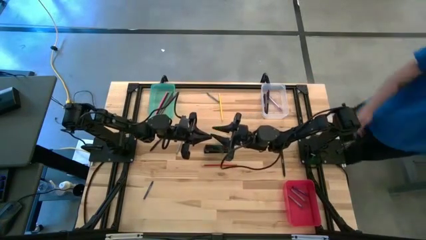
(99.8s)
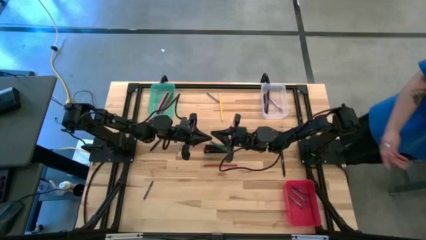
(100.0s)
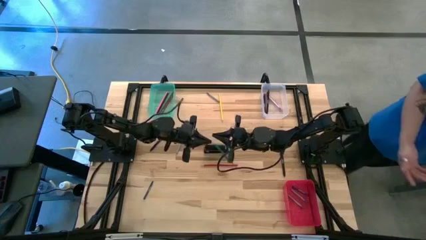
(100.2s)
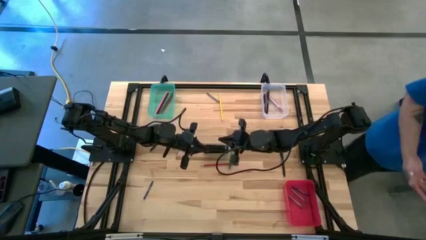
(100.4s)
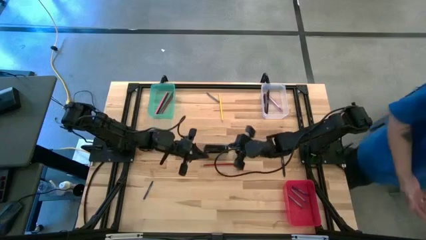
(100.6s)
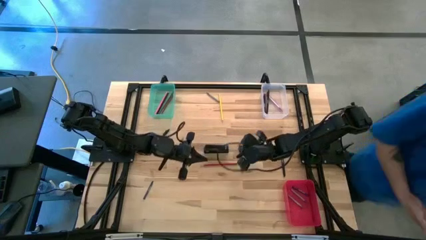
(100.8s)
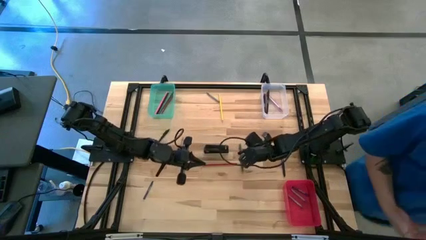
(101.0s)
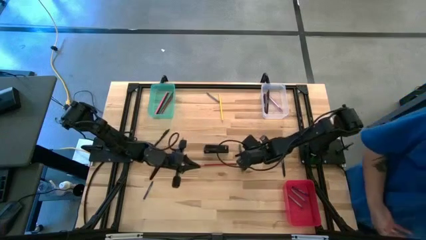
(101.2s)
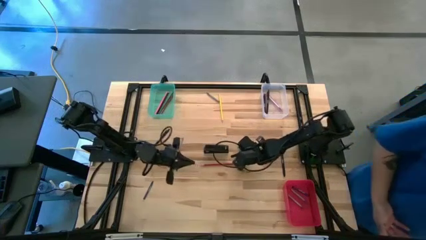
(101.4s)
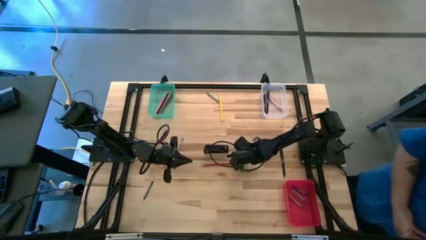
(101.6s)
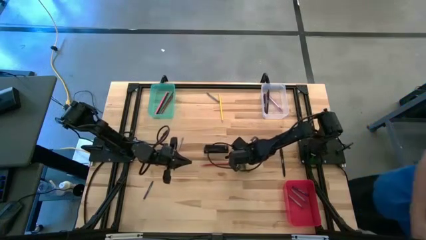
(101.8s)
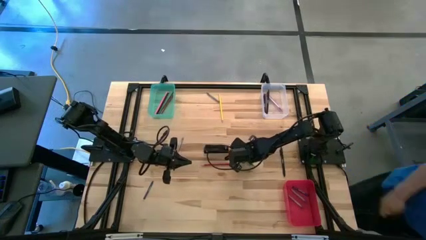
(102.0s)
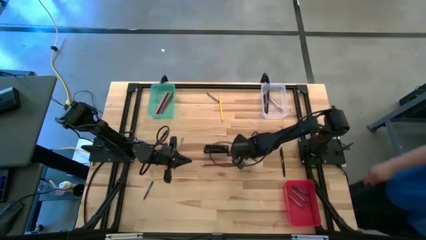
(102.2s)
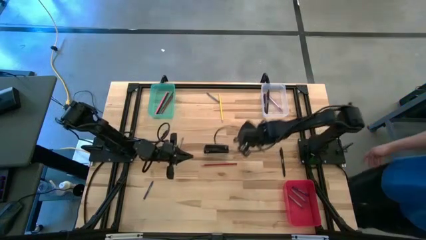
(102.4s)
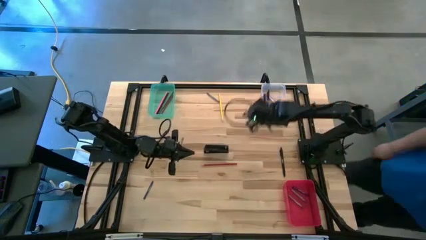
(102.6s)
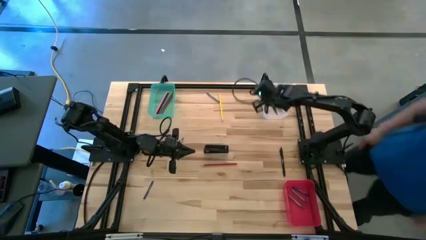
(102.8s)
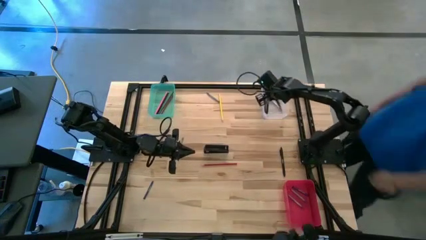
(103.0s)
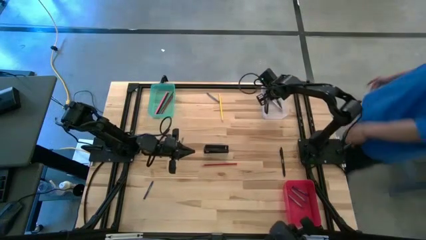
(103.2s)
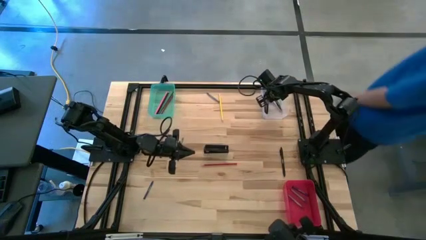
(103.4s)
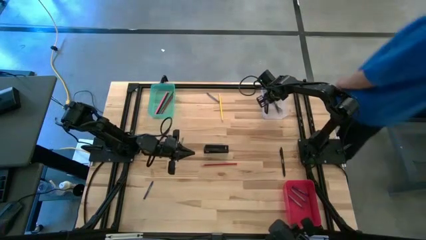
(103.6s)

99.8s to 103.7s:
Task: Sort crayons/erasers/pens/pencils in bins
Put the green pen into the transparent bin

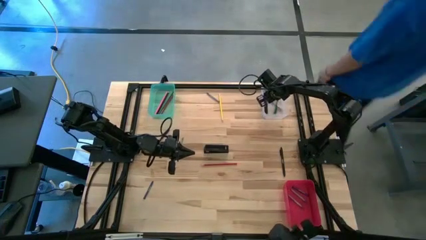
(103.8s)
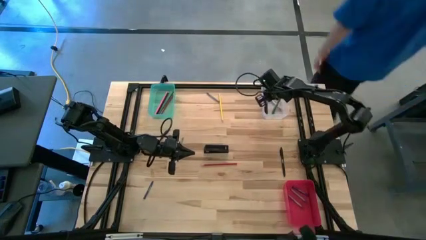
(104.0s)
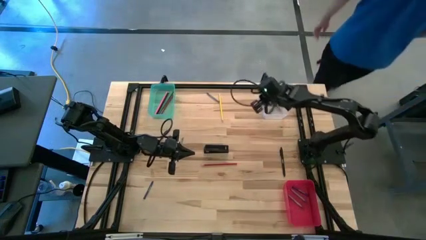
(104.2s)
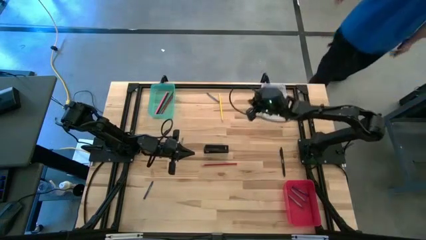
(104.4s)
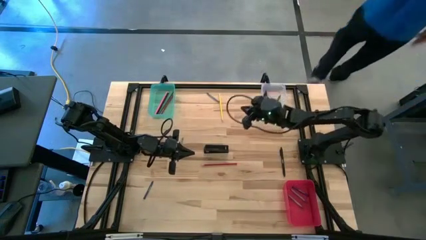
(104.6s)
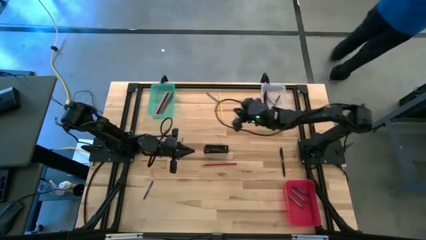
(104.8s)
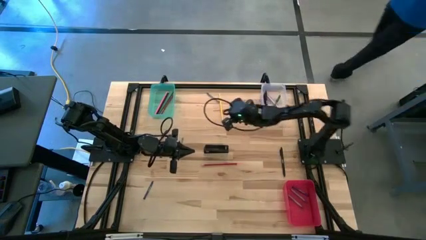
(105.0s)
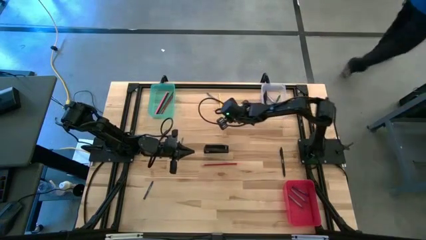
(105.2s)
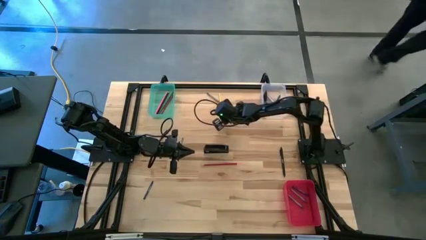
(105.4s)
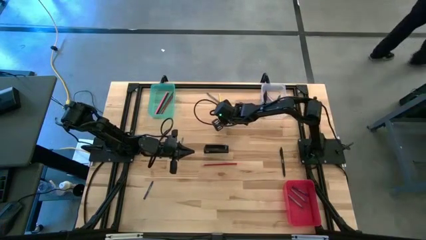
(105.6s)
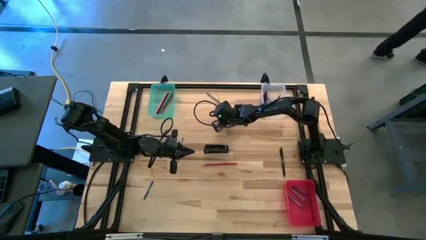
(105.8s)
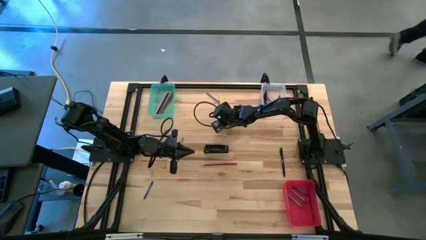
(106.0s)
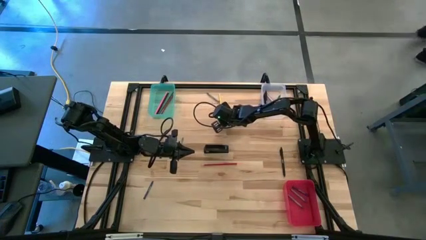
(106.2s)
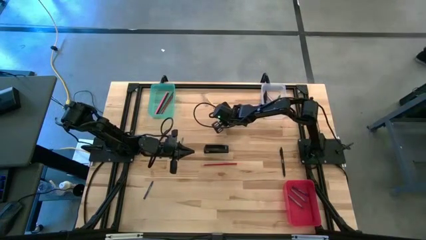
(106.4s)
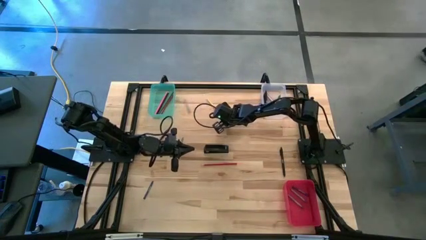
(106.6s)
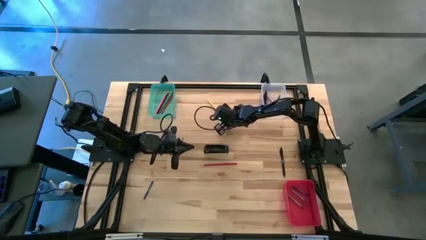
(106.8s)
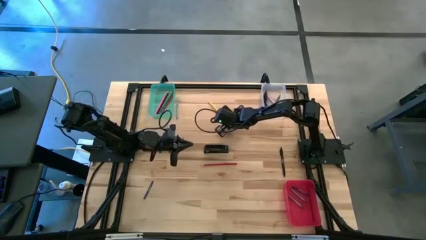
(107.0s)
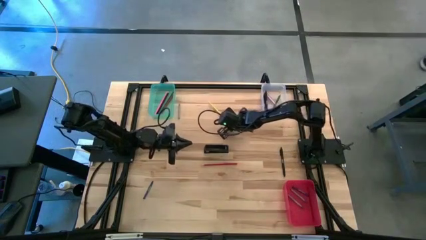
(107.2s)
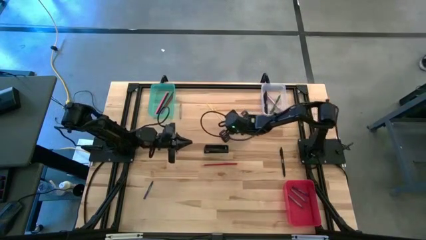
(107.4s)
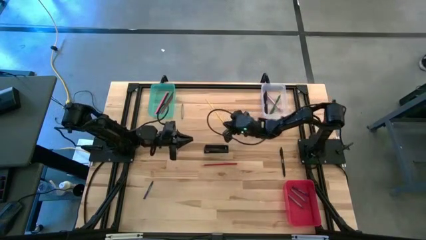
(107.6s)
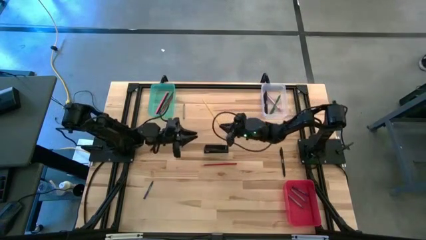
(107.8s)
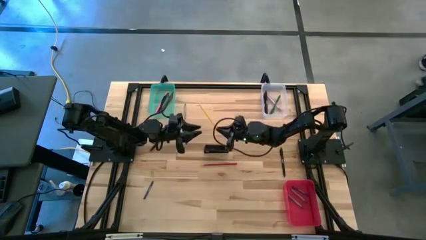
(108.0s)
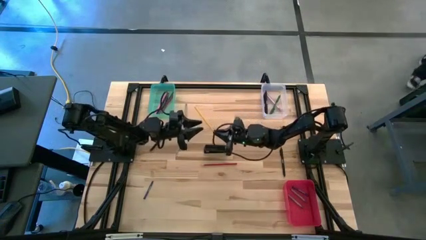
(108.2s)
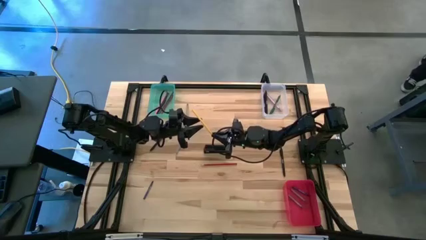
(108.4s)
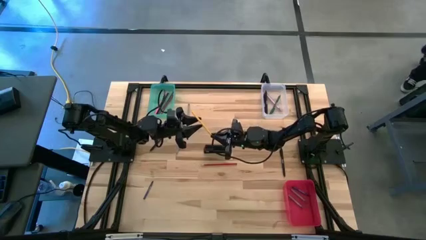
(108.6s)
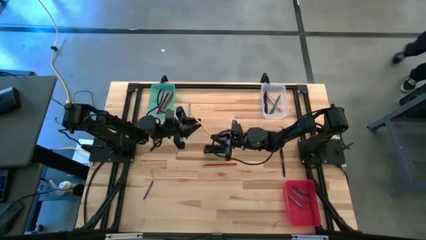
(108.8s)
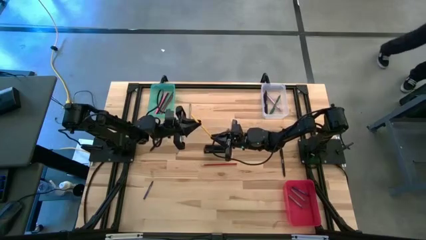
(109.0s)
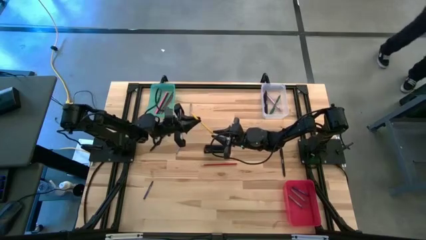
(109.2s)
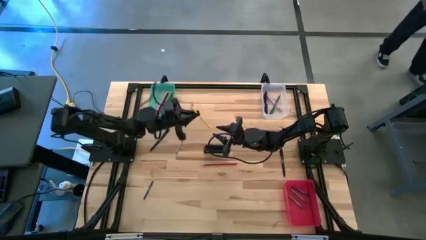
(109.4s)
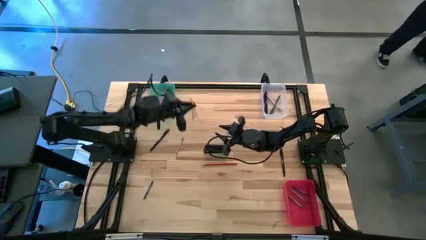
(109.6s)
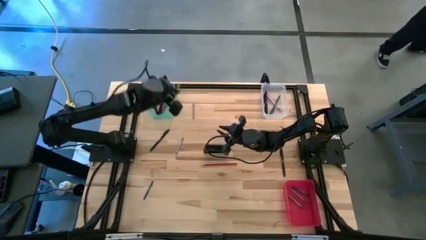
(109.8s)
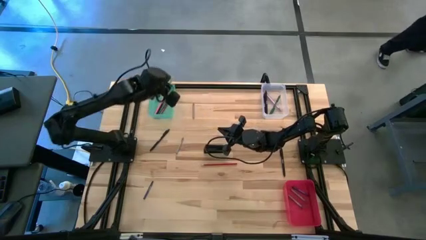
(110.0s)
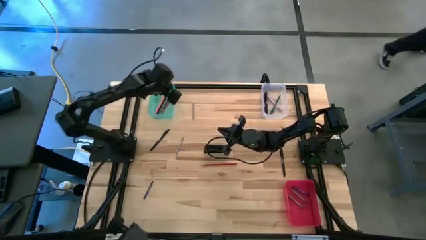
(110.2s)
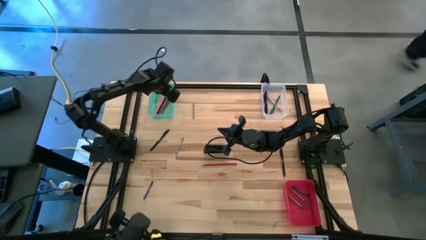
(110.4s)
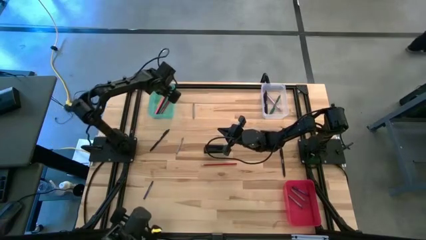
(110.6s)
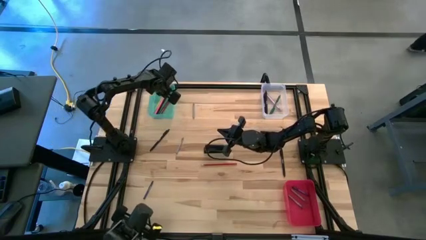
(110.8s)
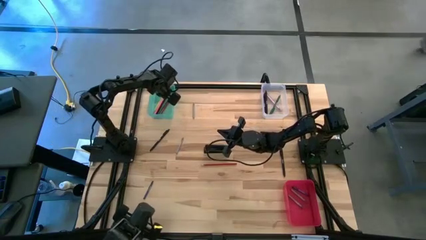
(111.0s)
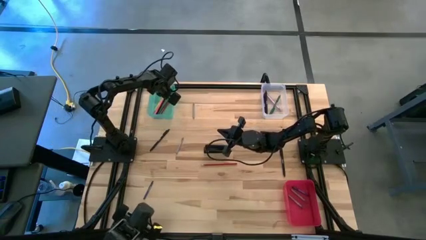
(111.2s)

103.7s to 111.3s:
Put the yellow pencil into the green bin

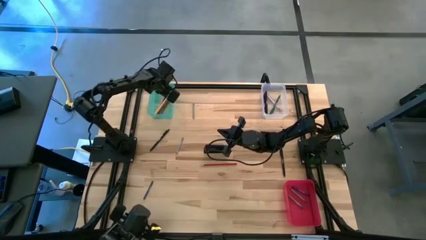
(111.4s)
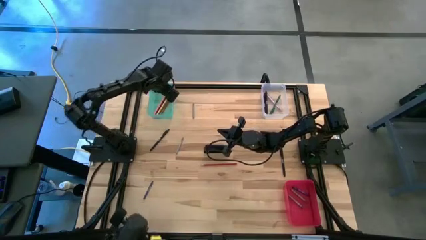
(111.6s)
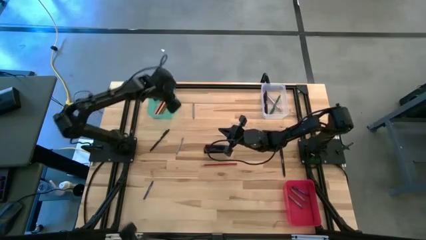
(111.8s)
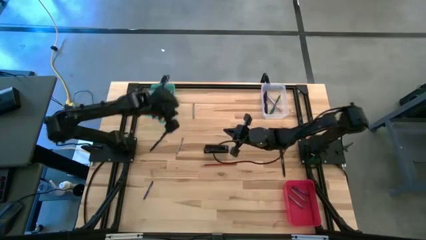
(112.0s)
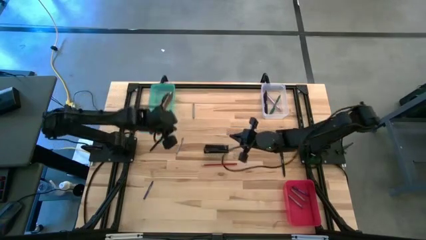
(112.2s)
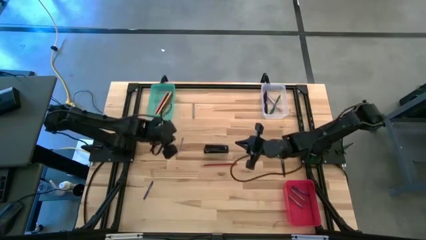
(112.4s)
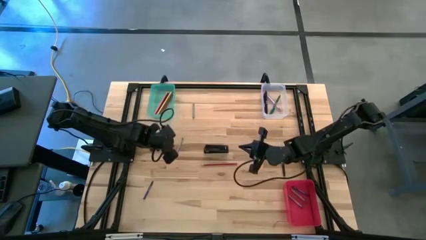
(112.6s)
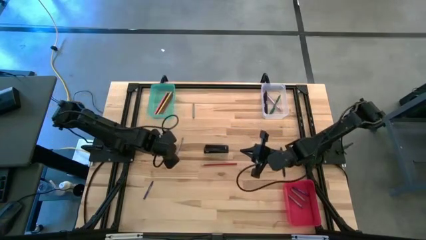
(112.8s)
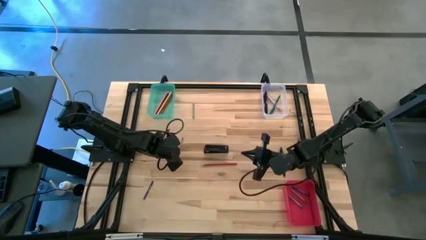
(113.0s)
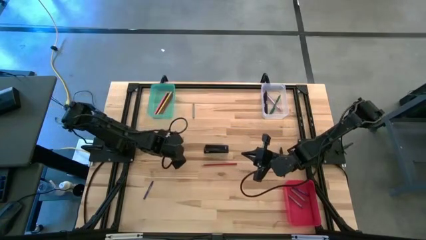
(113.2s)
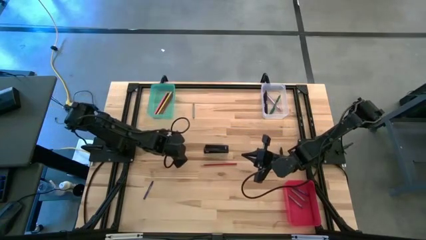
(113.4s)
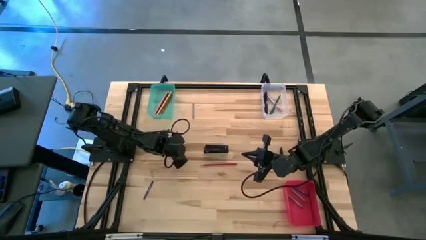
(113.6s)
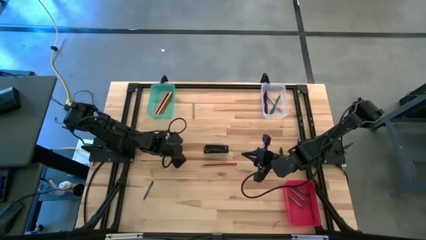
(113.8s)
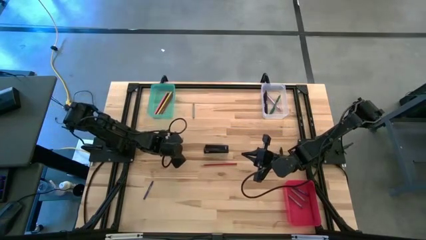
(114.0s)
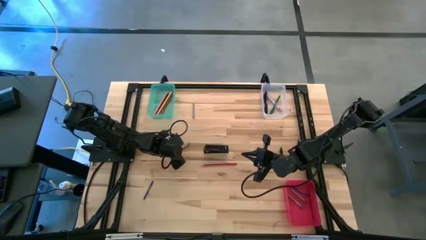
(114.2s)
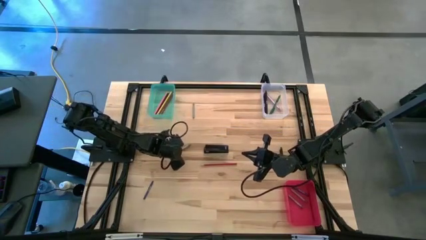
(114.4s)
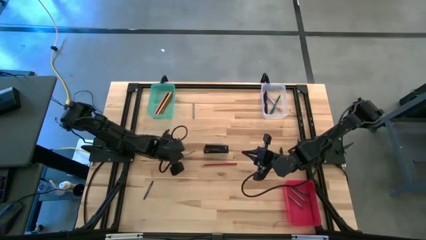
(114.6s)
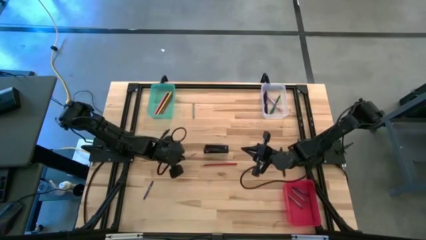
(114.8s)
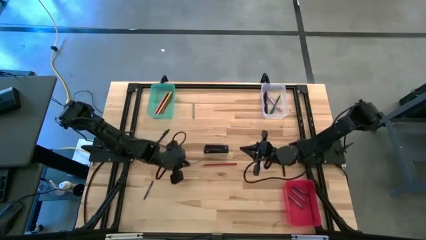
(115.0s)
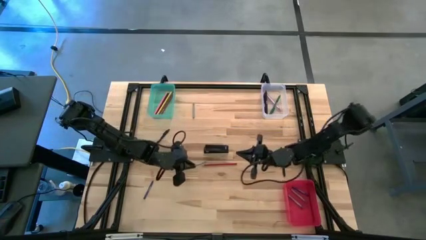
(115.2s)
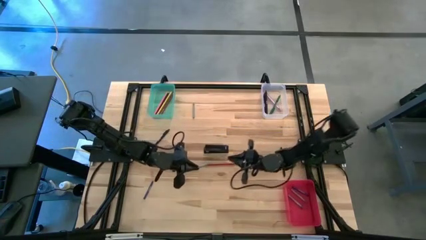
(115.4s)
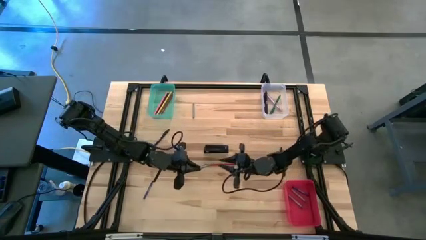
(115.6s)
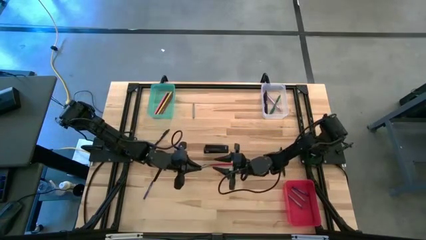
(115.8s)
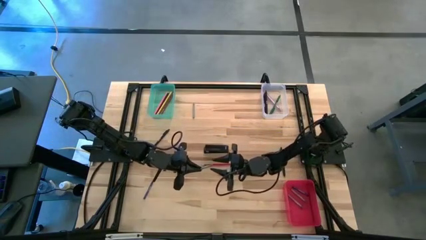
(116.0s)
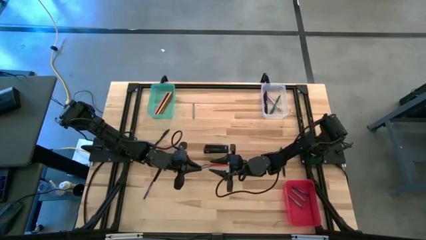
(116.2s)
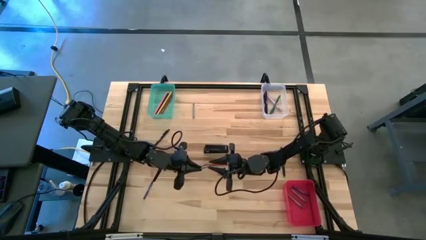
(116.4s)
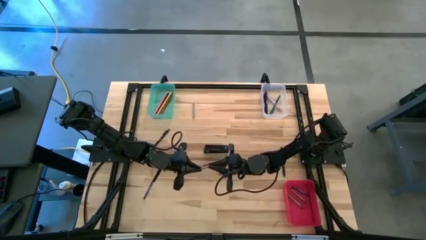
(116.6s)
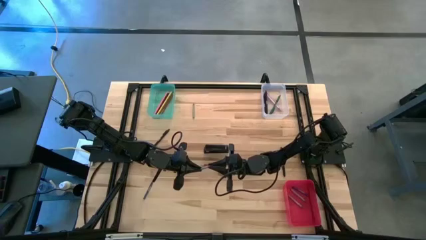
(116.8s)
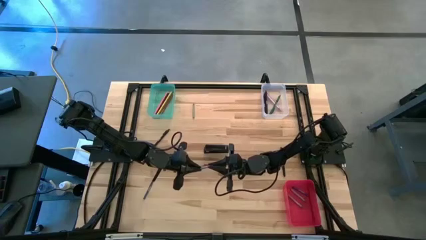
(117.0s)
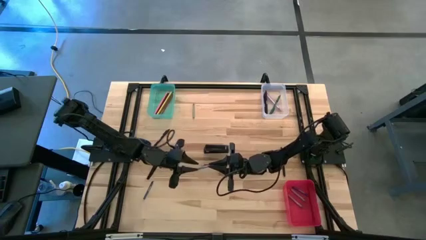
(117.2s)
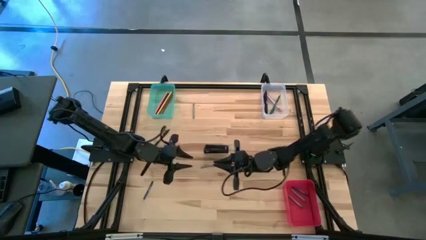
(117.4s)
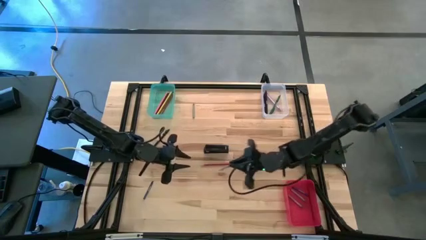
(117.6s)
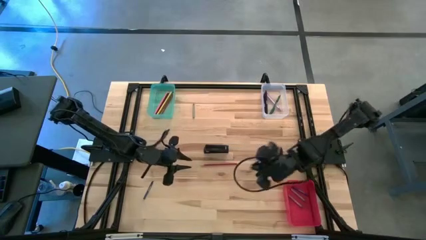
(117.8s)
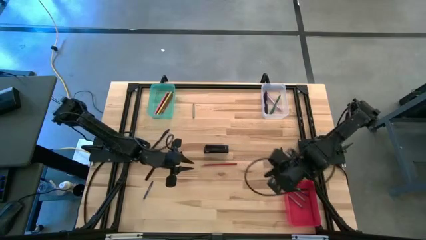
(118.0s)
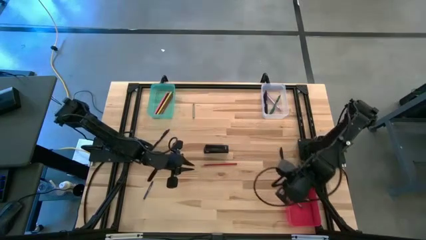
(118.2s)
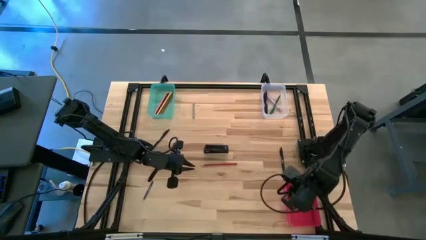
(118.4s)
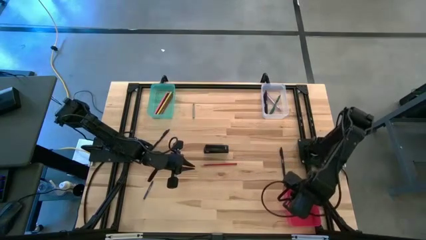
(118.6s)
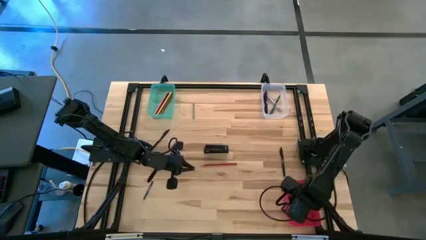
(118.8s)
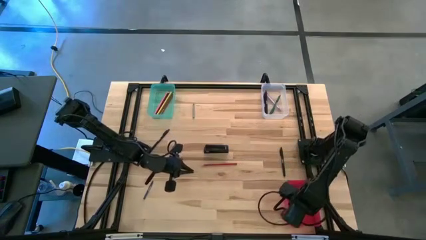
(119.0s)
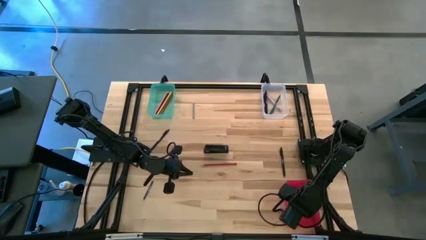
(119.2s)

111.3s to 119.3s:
Put the gray crayon into the red bin
